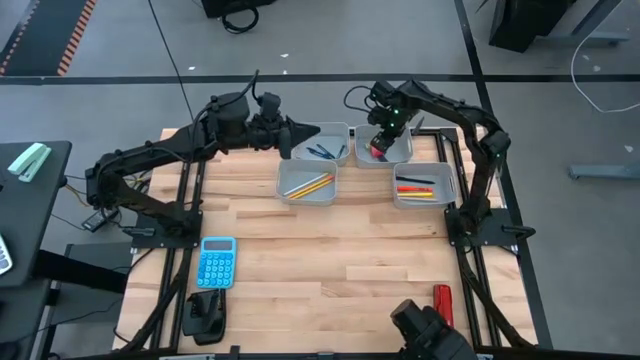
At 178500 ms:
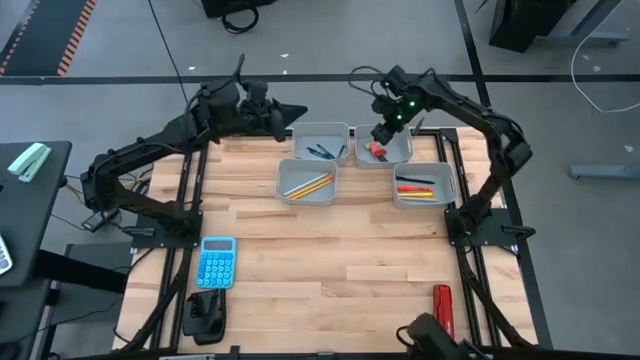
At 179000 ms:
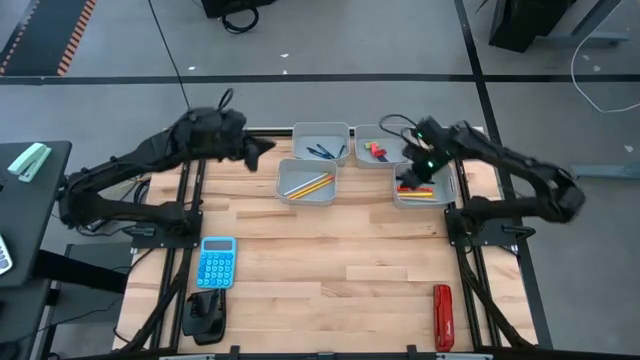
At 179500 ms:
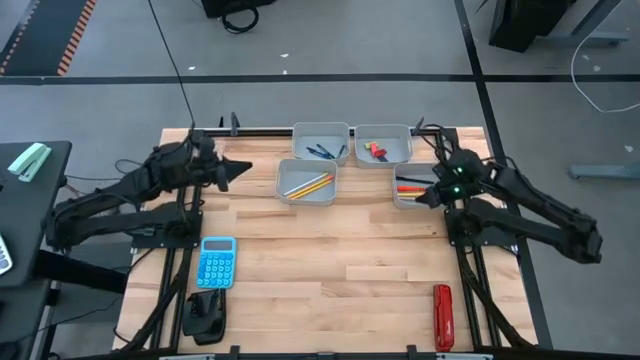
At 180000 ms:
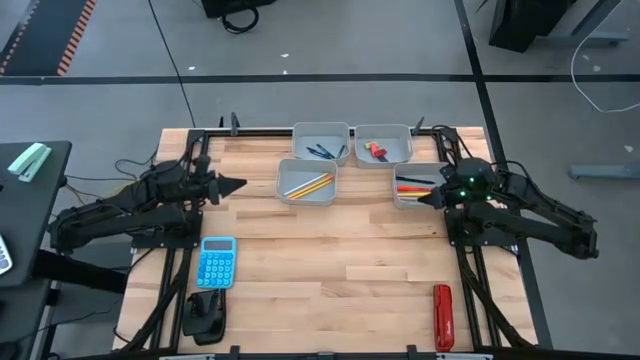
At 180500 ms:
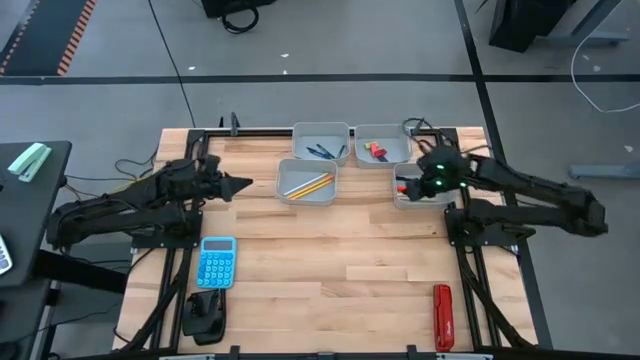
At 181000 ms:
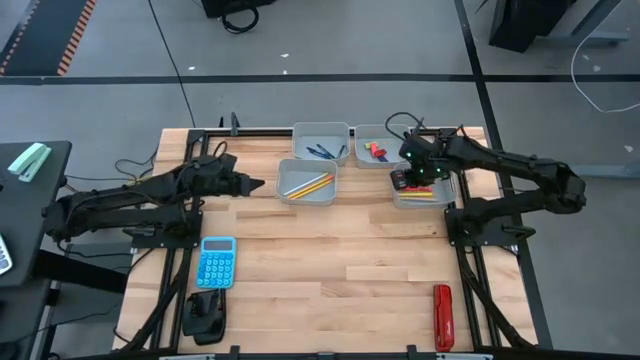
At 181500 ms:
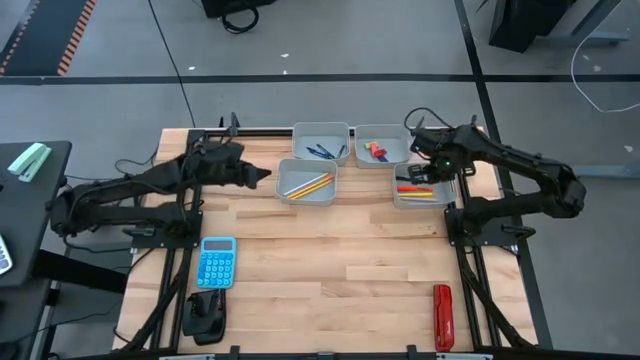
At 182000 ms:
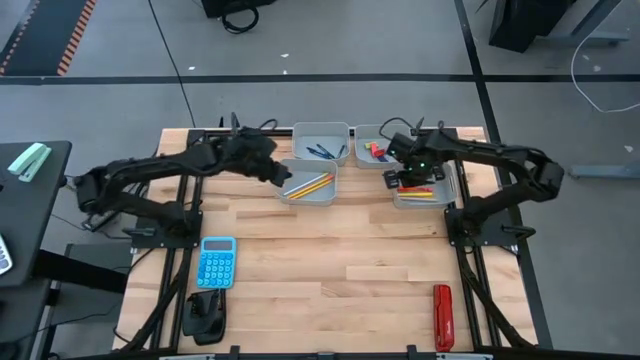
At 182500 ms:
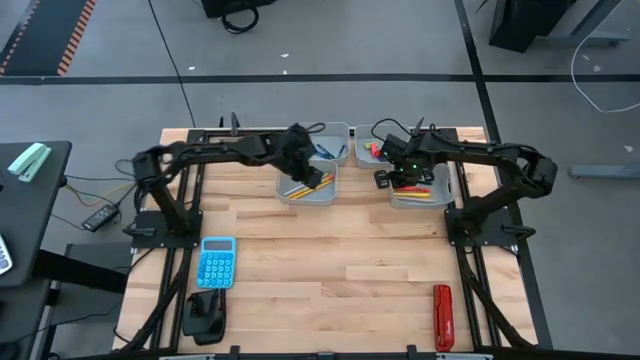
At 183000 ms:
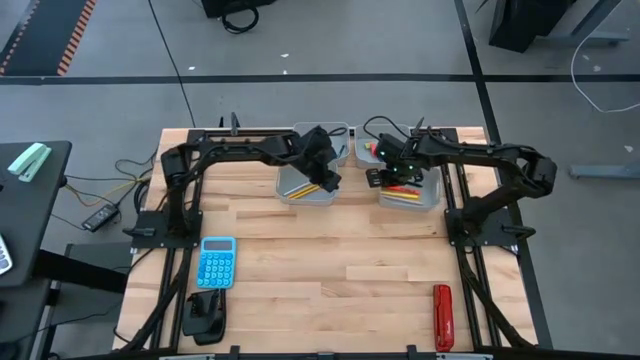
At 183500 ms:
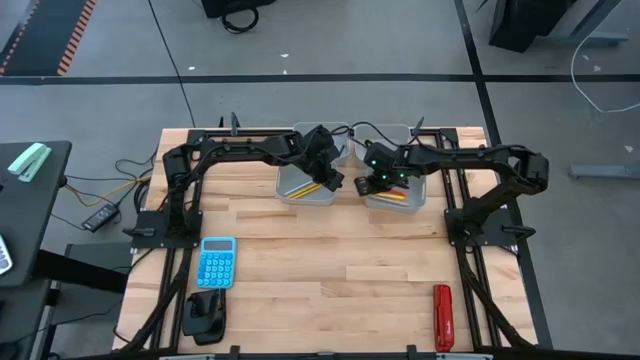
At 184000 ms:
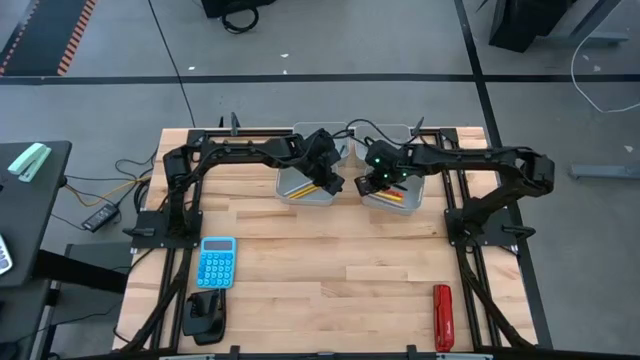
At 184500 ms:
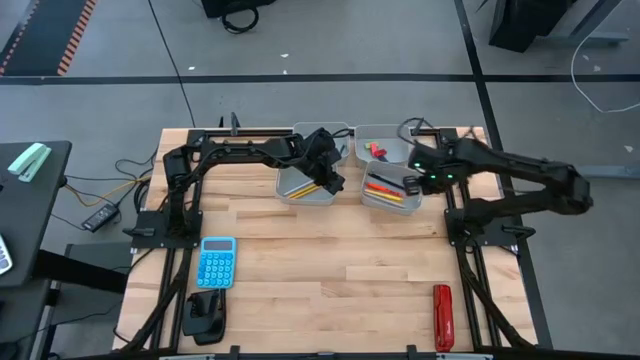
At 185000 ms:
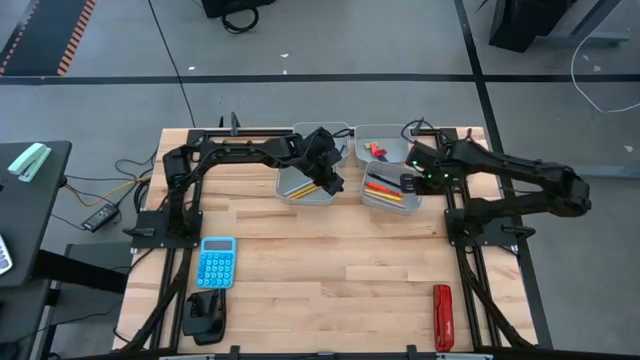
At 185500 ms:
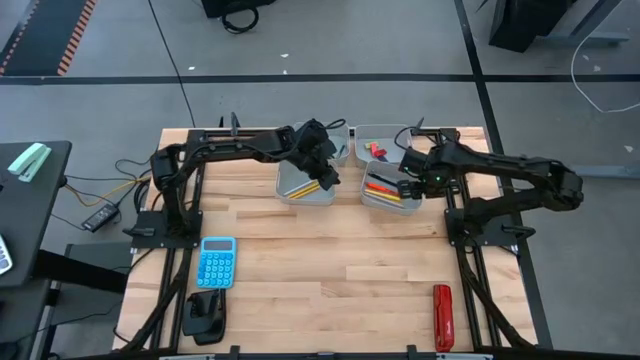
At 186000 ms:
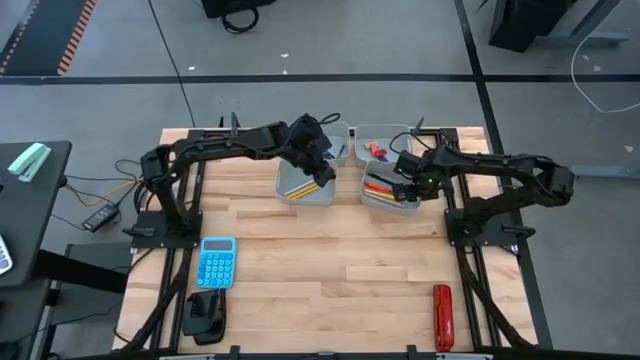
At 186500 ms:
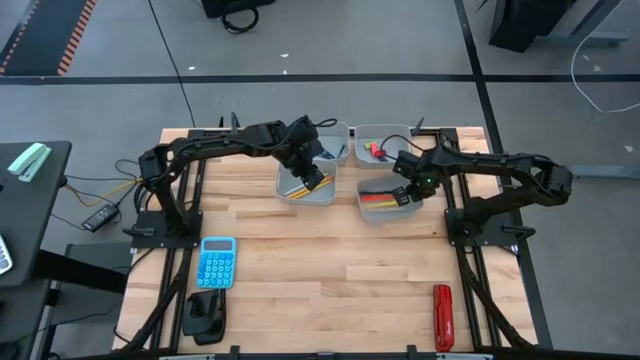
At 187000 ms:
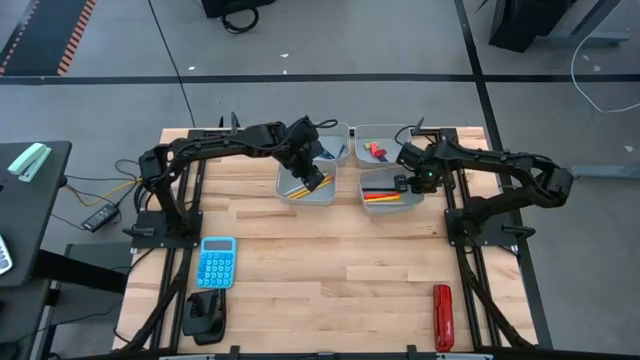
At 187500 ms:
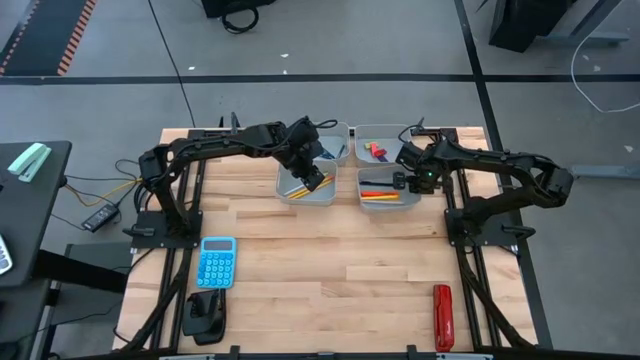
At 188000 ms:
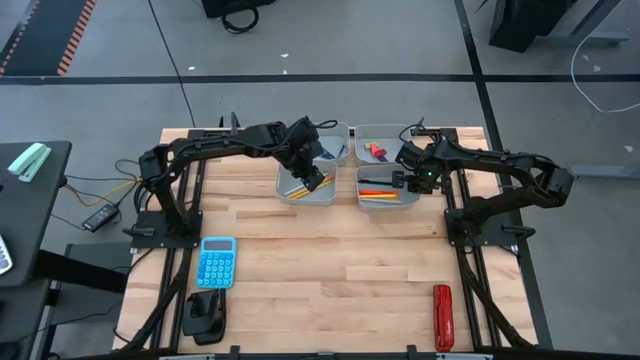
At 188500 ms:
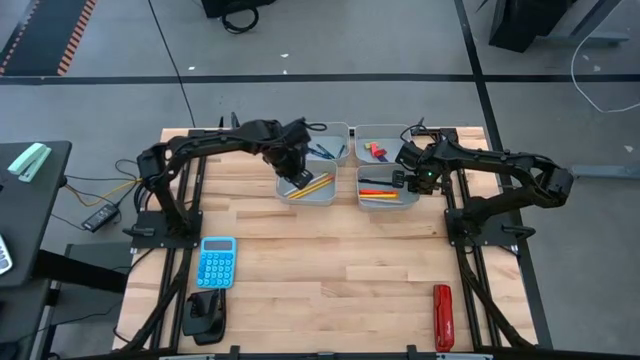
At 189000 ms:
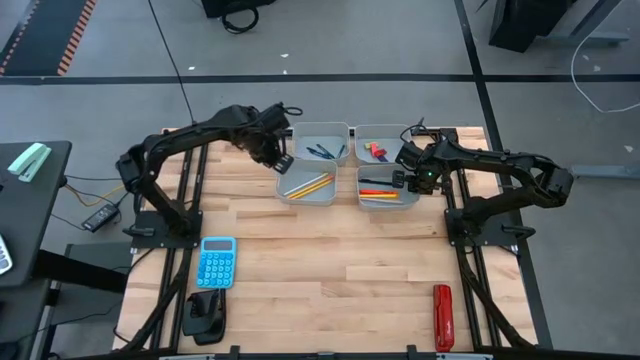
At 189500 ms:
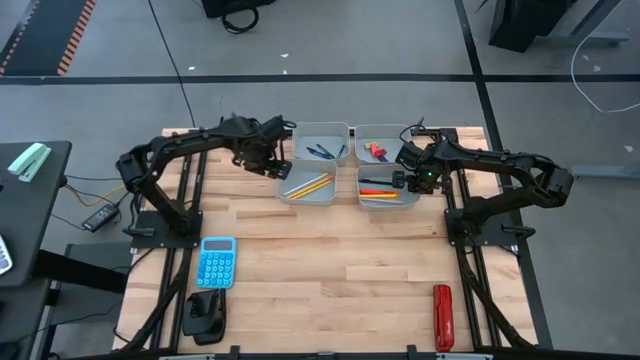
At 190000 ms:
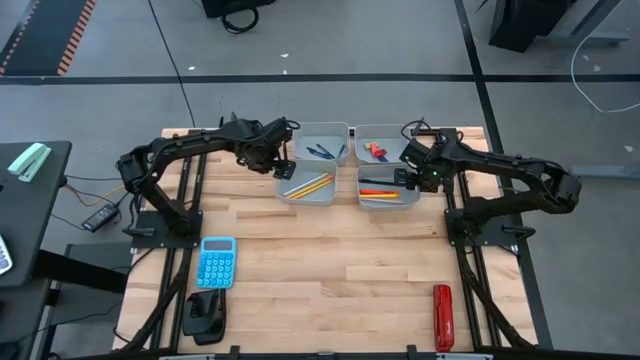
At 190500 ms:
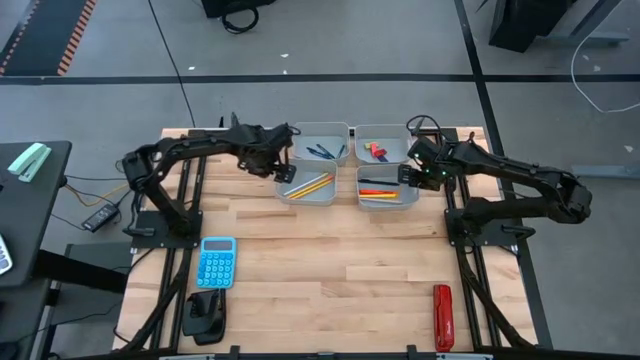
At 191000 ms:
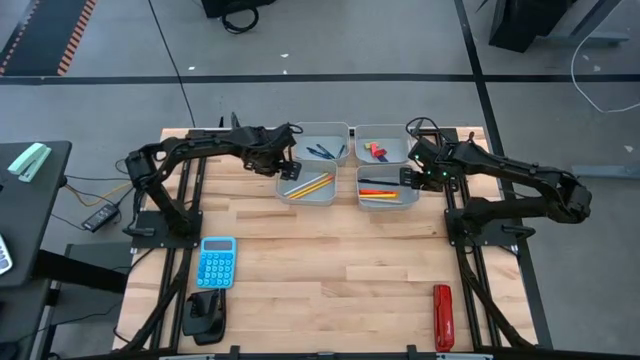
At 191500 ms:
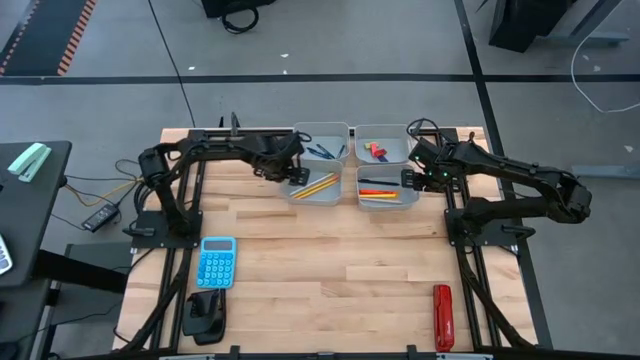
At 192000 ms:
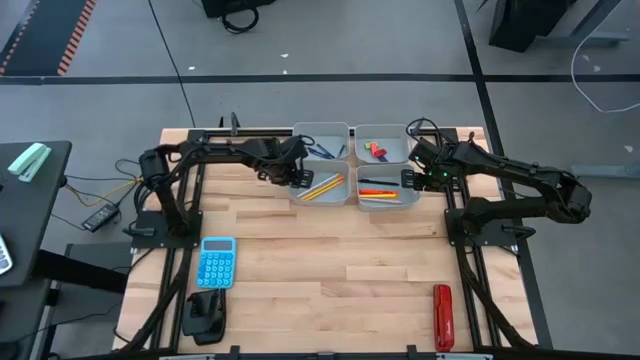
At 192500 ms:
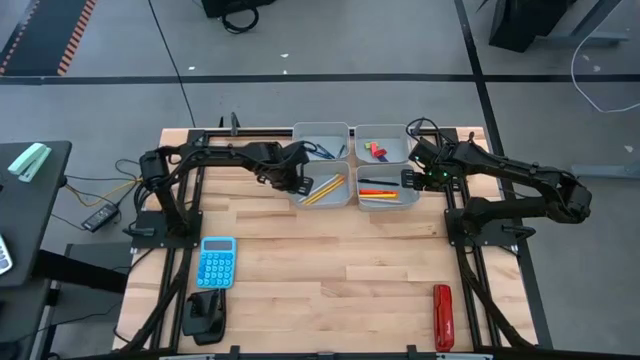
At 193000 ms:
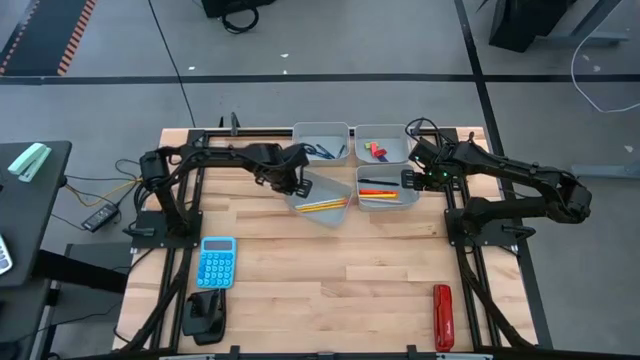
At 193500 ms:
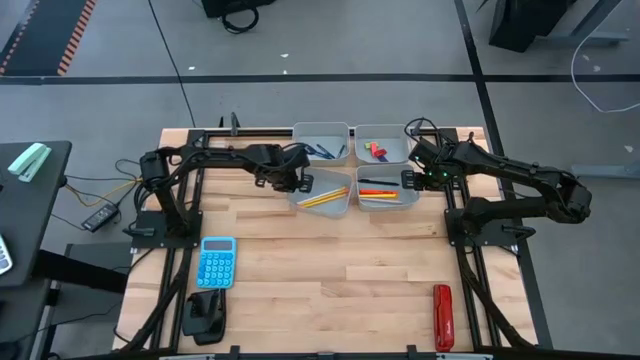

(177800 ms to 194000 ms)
Task: Sort crayons/erasers/pens/pencils in bins
Adjust the gray bins

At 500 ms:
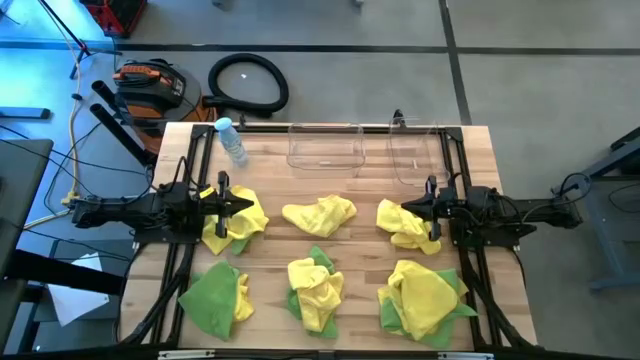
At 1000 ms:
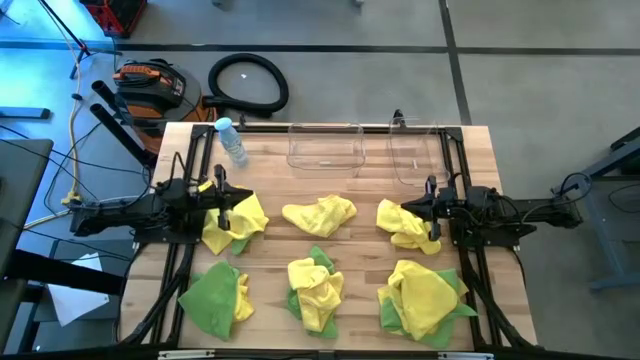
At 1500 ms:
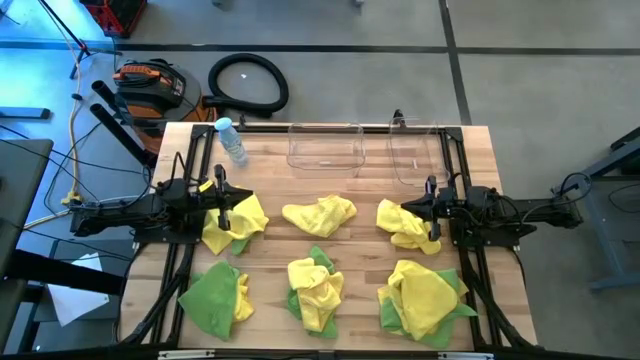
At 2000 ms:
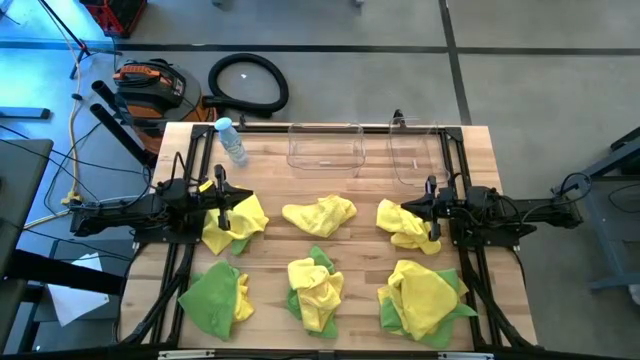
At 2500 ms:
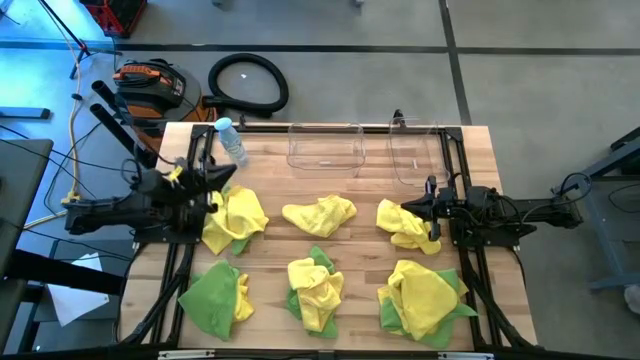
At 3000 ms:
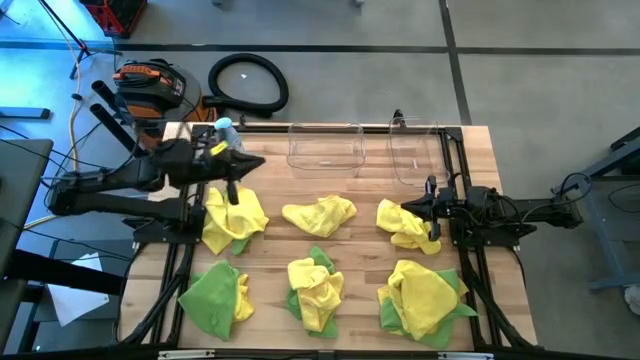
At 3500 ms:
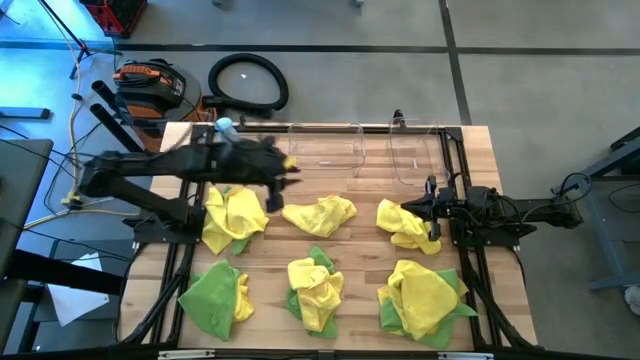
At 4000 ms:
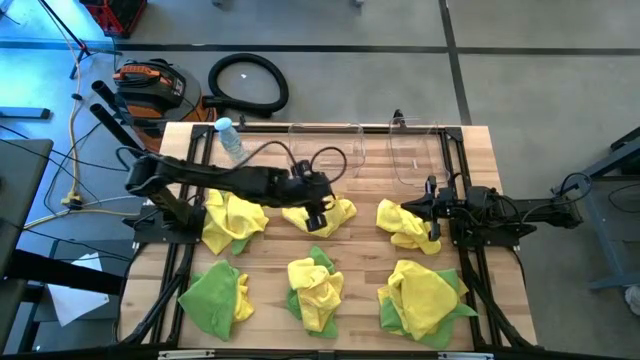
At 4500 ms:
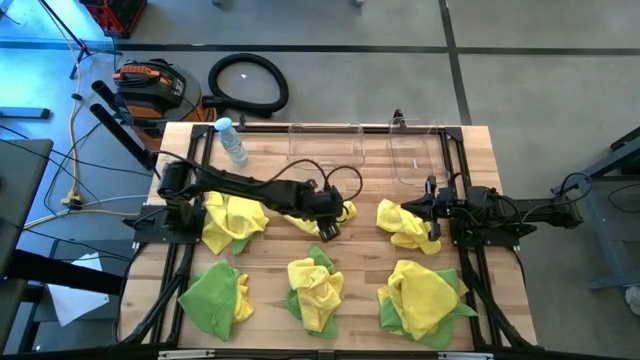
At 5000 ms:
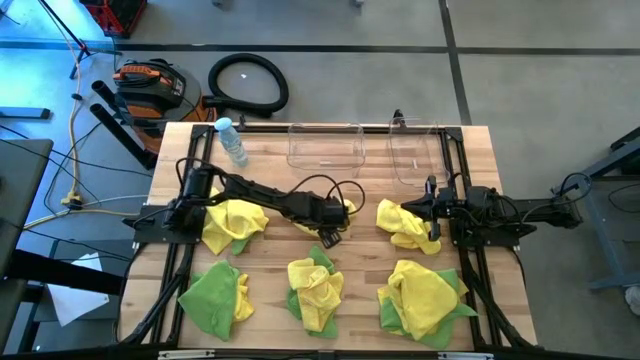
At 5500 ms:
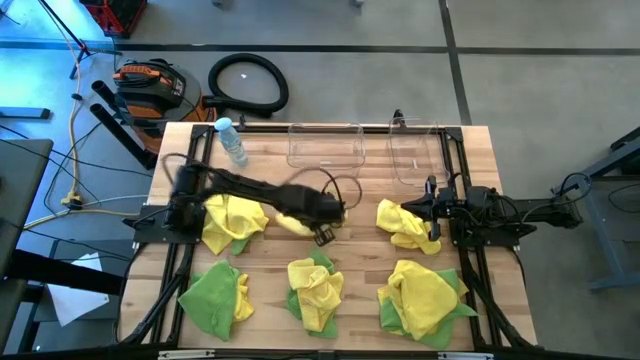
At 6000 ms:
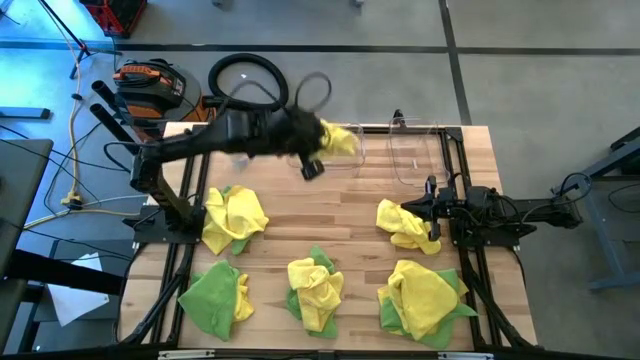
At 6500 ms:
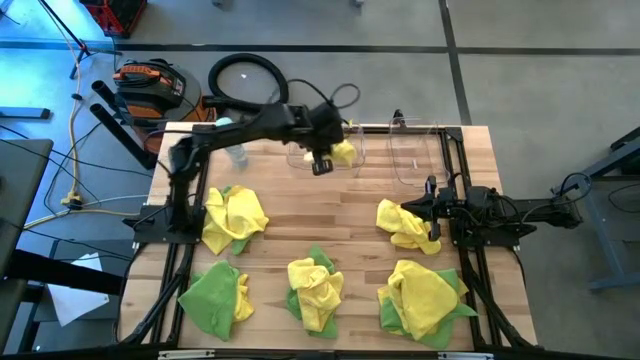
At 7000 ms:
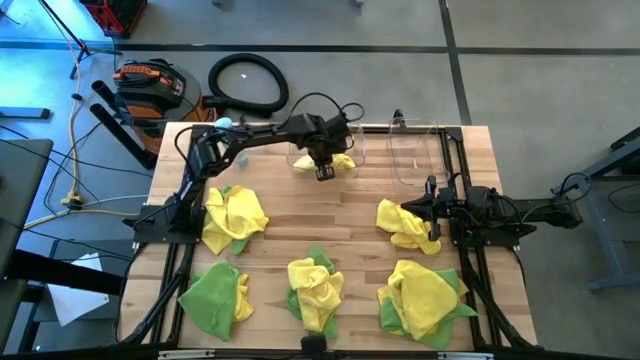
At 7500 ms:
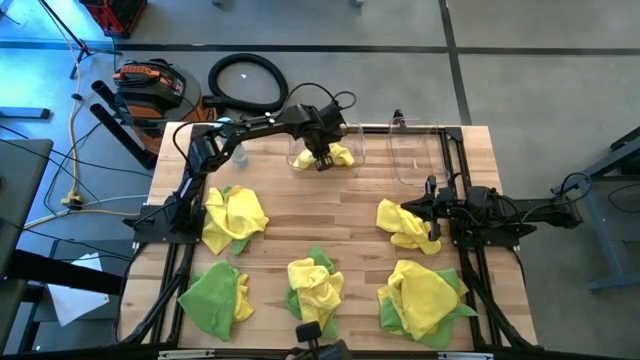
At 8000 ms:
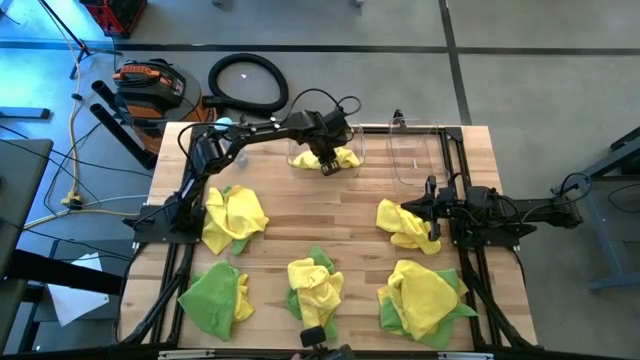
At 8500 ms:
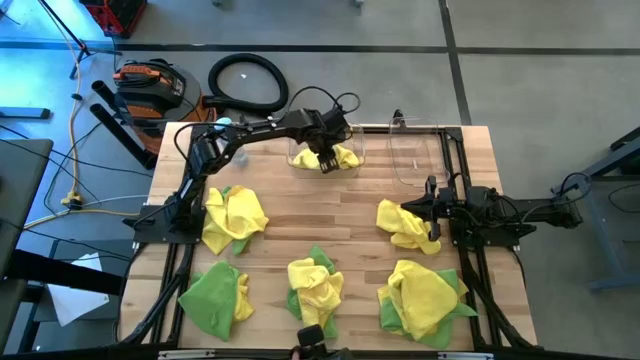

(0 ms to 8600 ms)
Task: Sort microfiber towel by color & place in baskets
Put the top center yellow microfiber cloth into the left transparent bin
